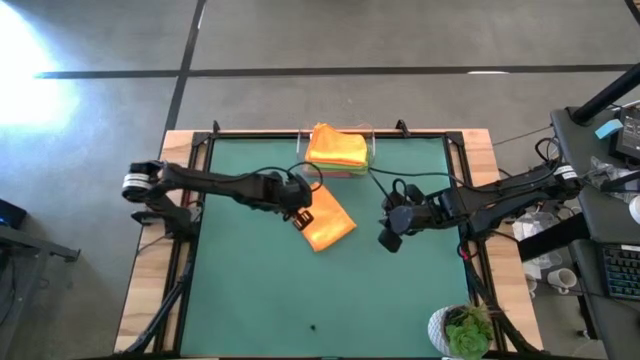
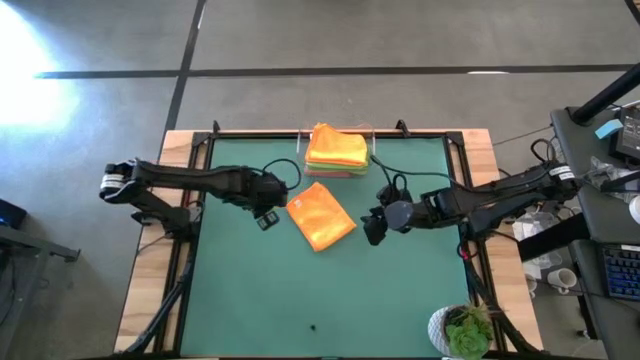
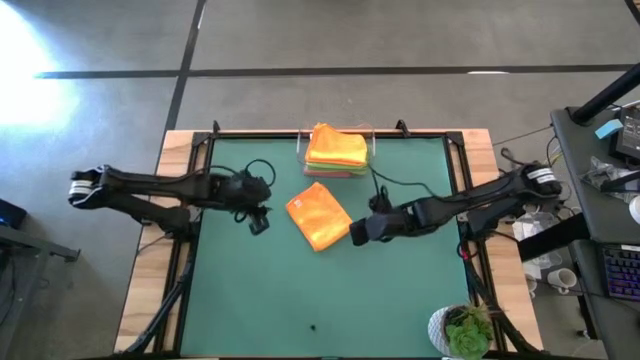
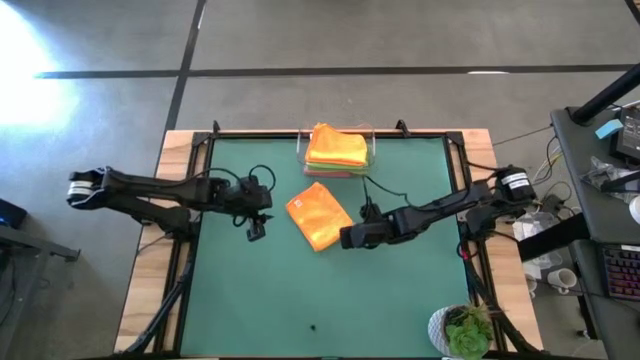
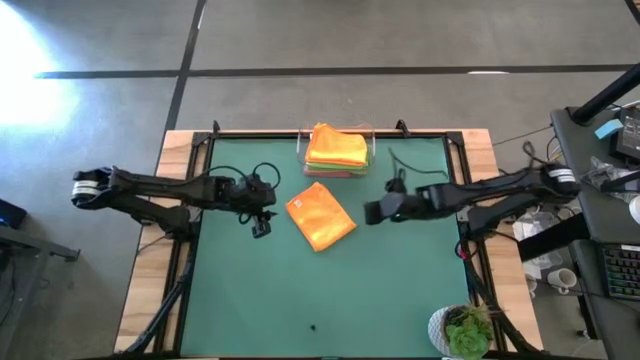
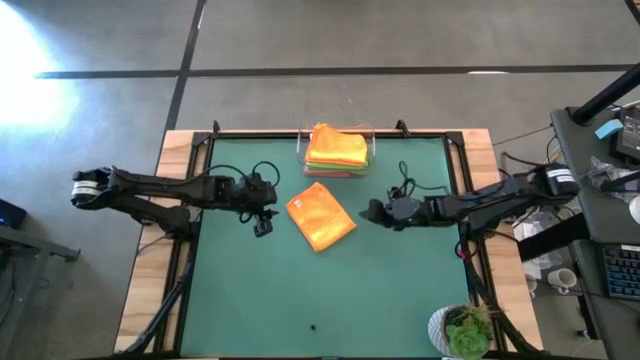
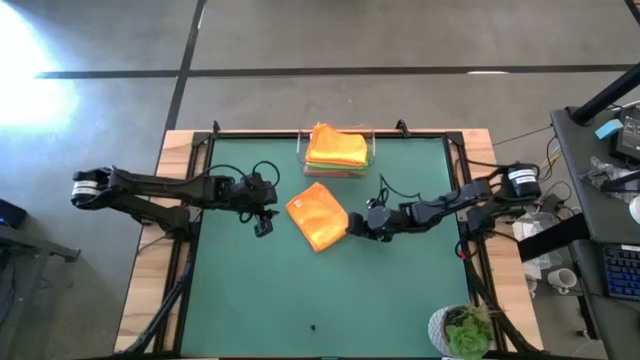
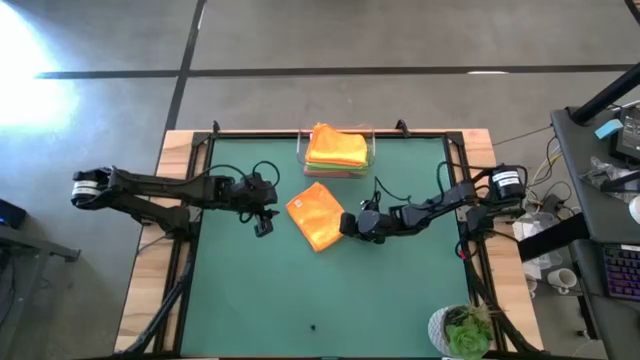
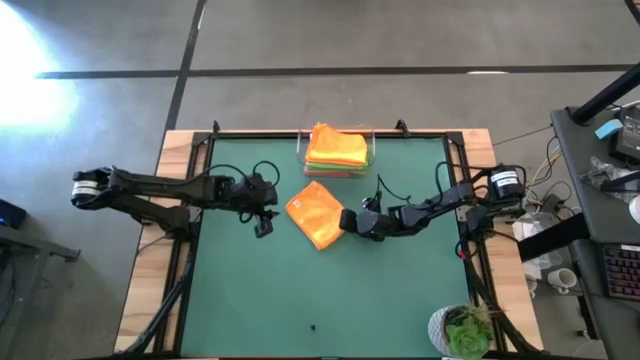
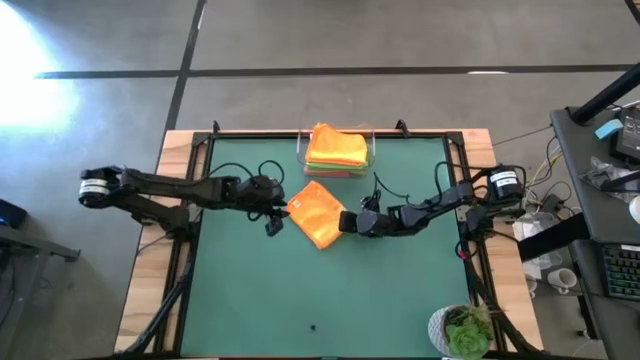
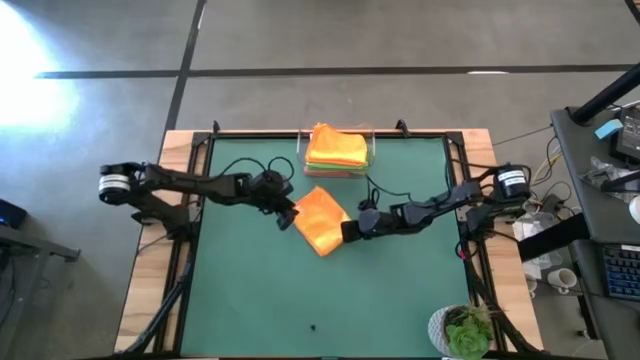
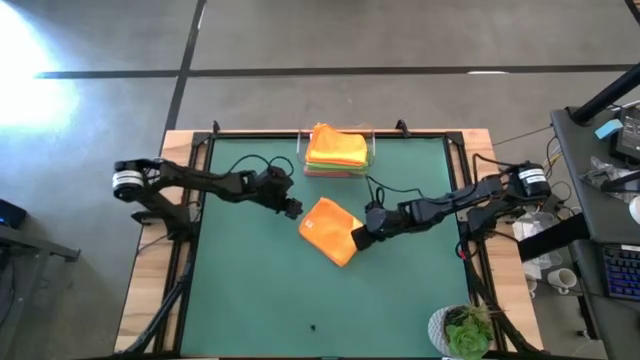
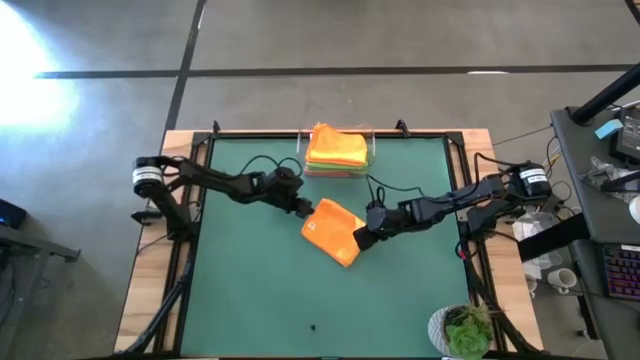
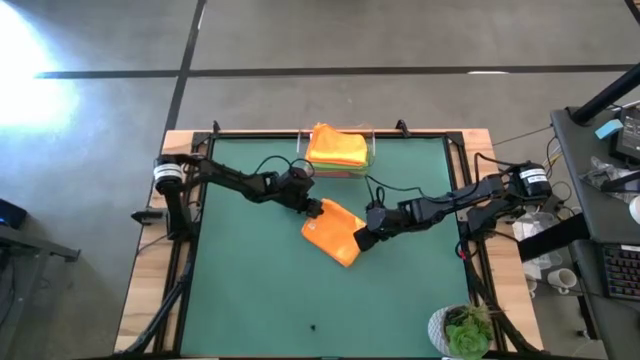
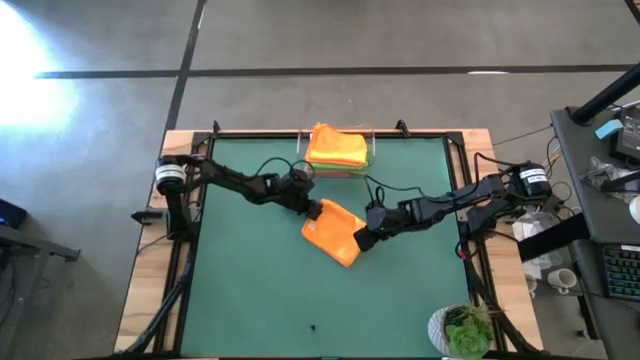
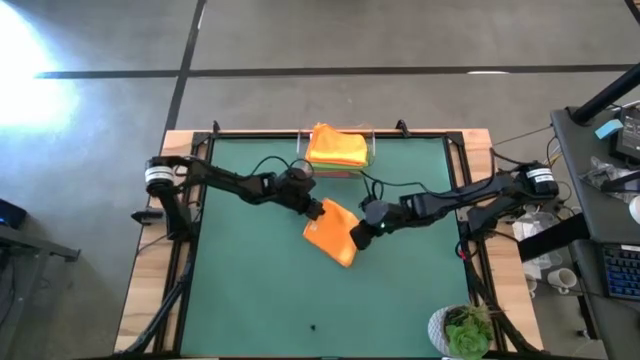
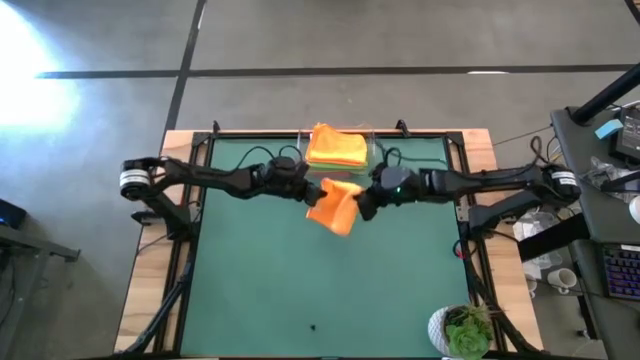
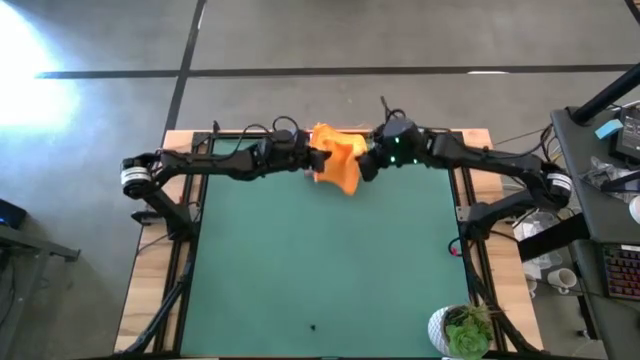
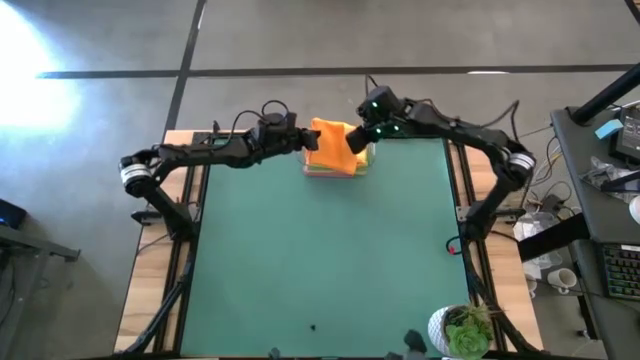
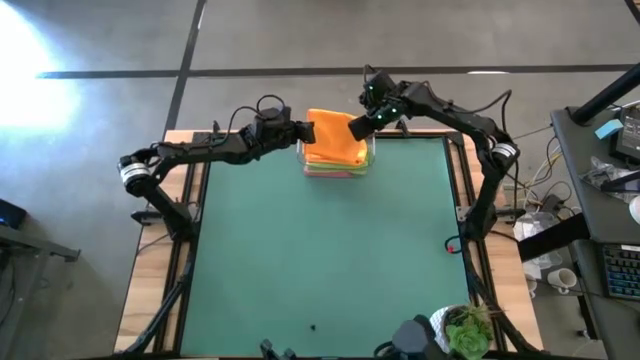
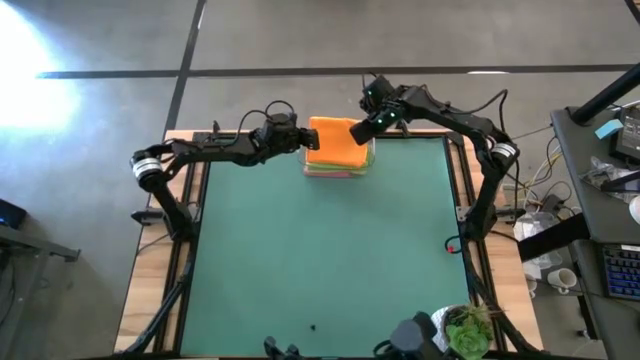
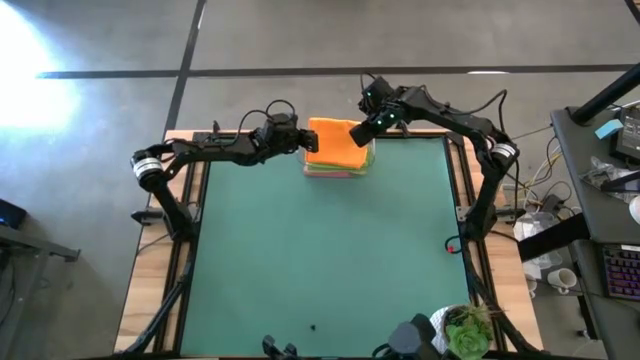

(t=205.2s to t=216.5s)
Task: Fold microfiber towels
Put the orange microfiber towel into the transparent bin

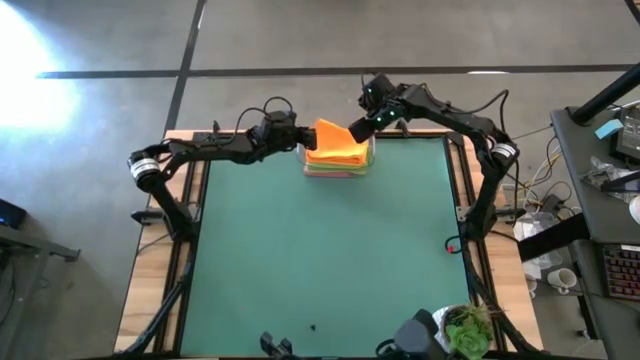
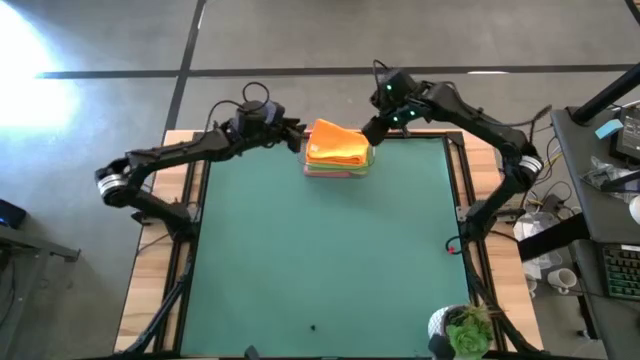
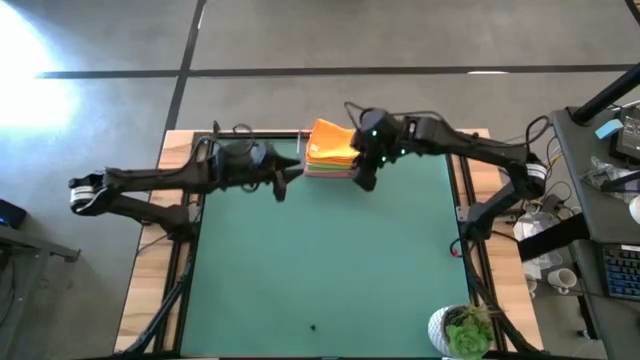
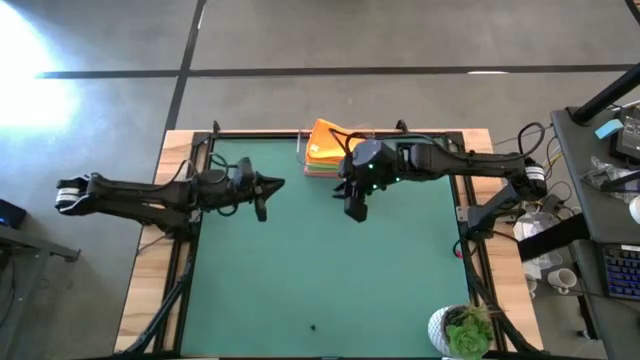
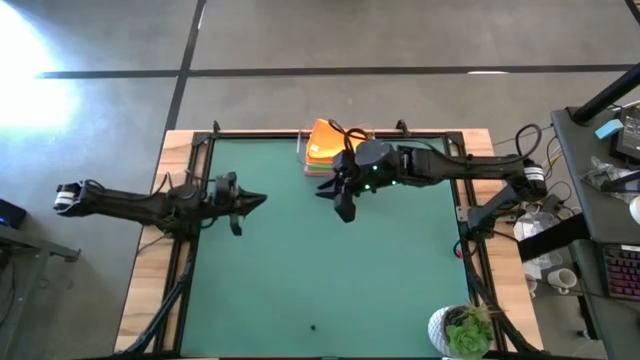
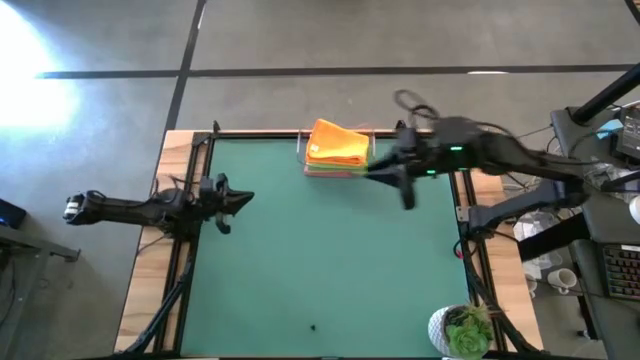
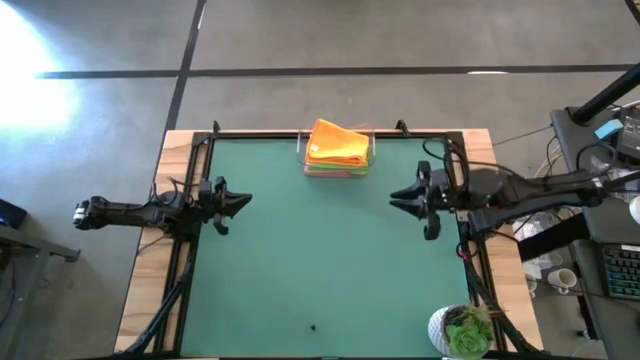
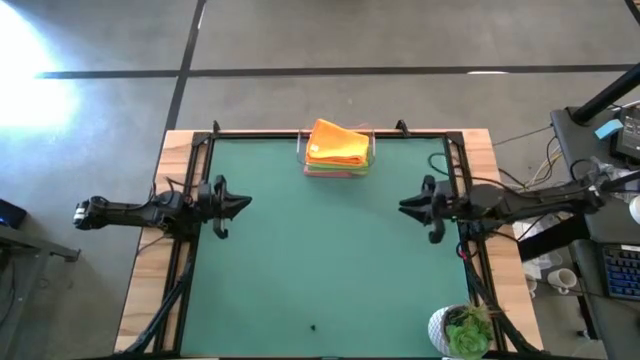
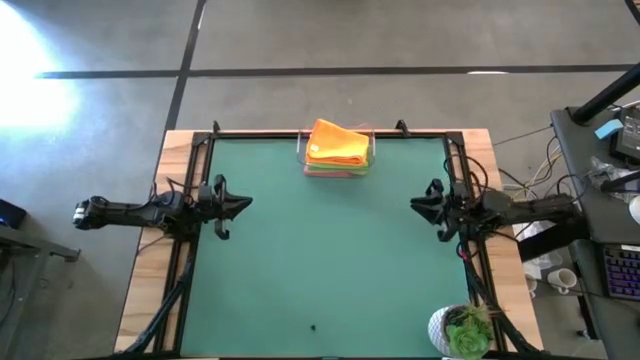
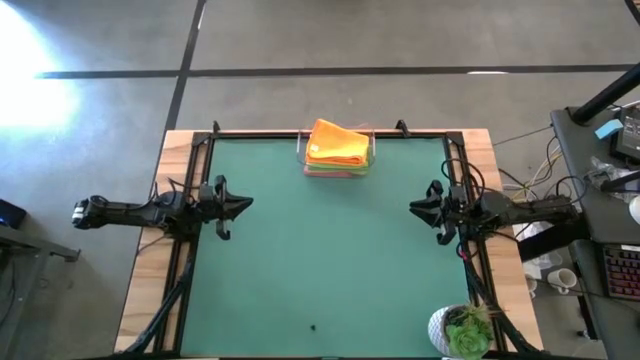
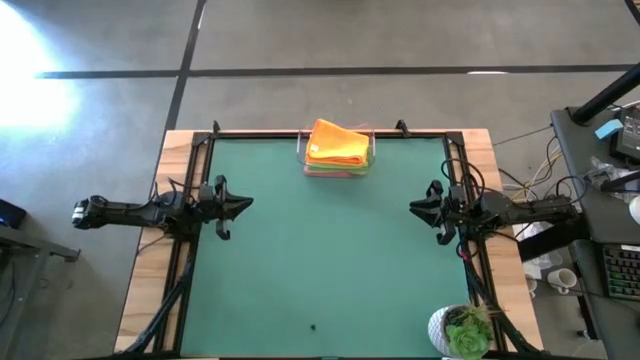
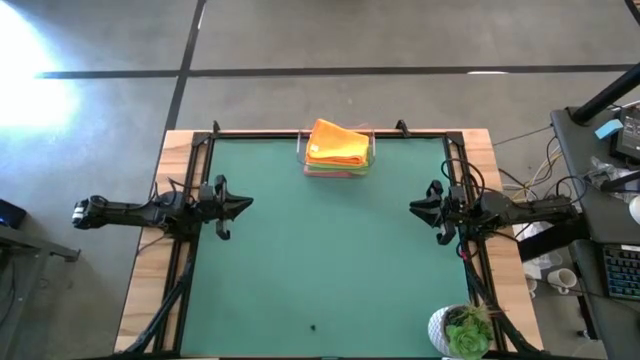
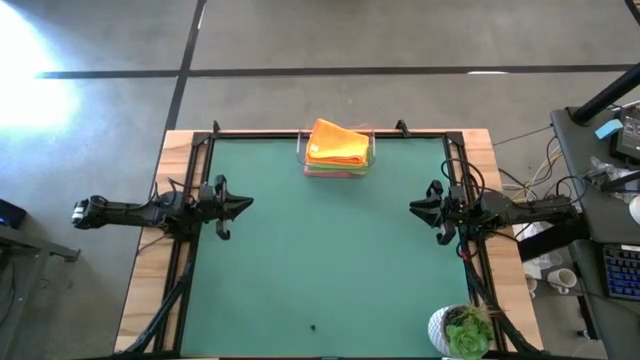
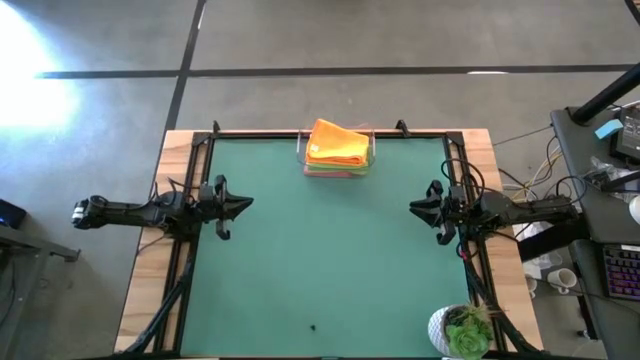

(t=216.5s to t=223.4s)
Return to Home Position

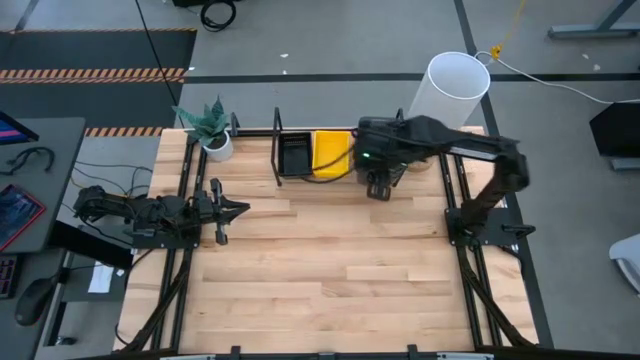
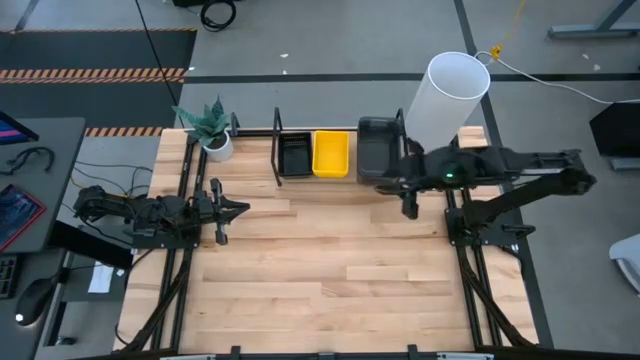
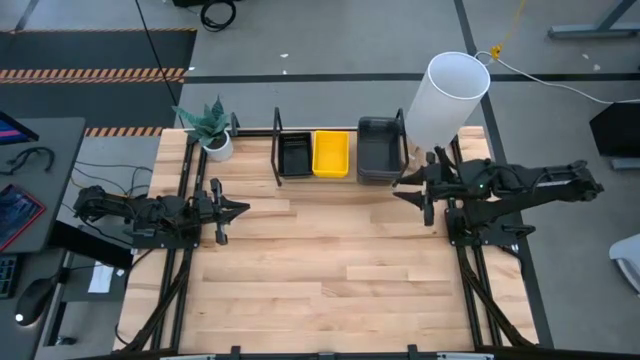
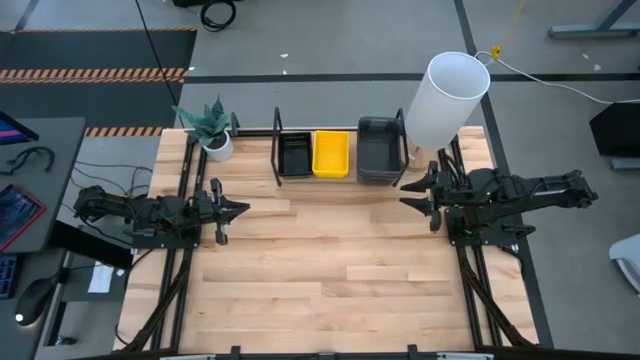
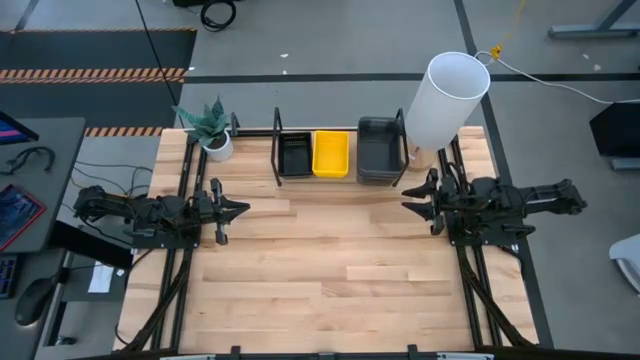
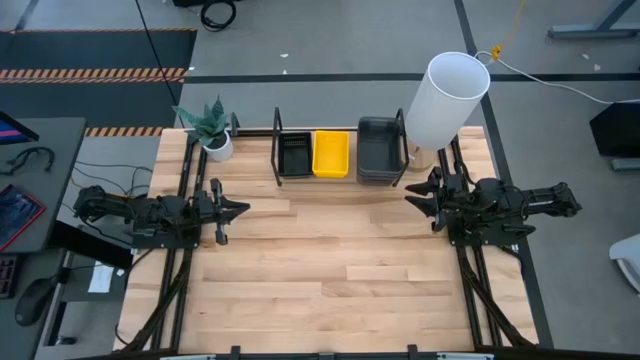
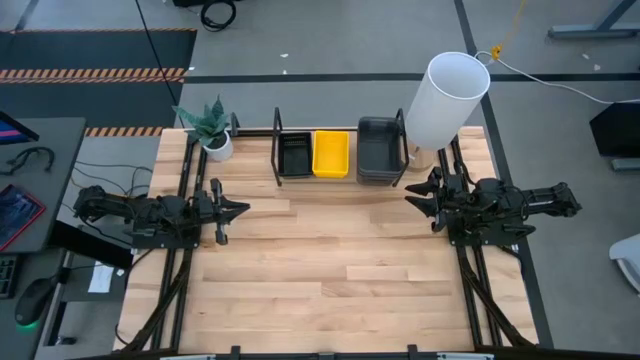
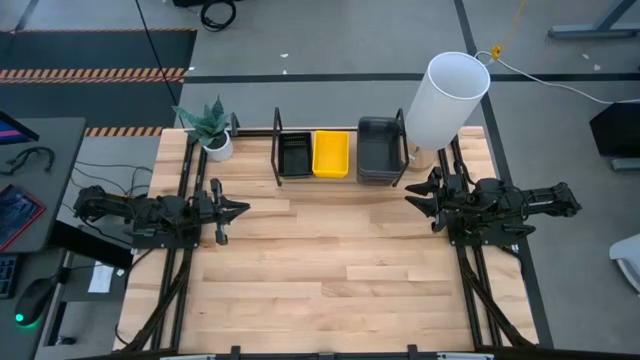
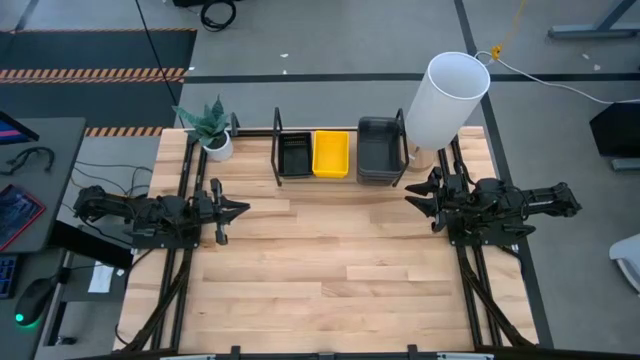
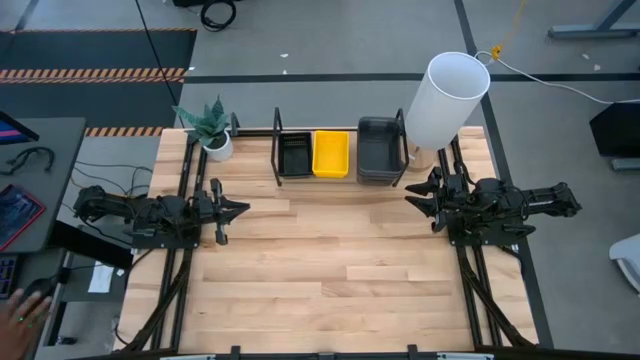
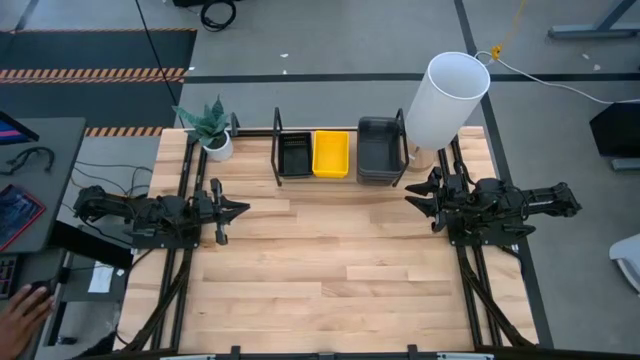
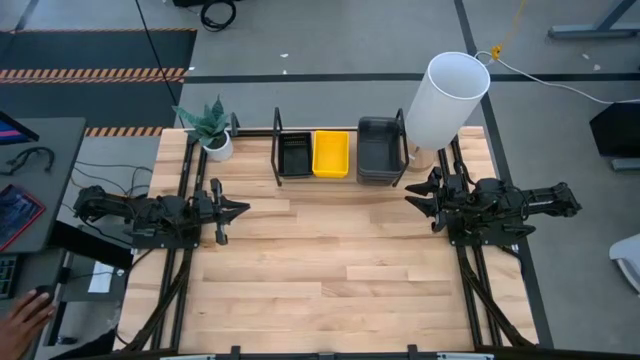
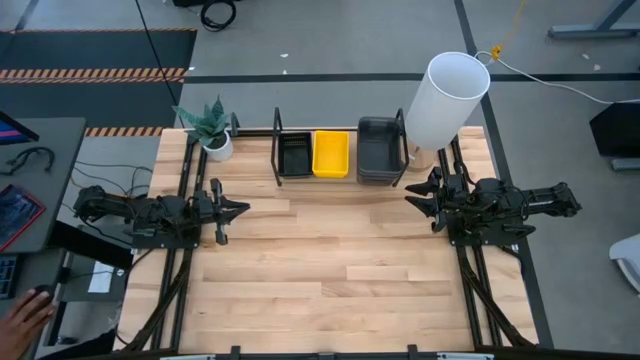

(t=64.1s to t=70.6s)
Task: Stack baskets on shelf by color
Return to Home Position
